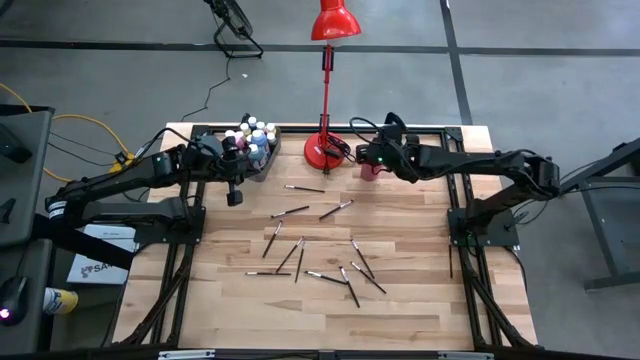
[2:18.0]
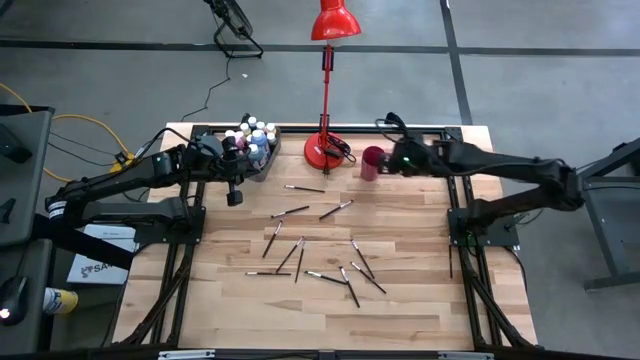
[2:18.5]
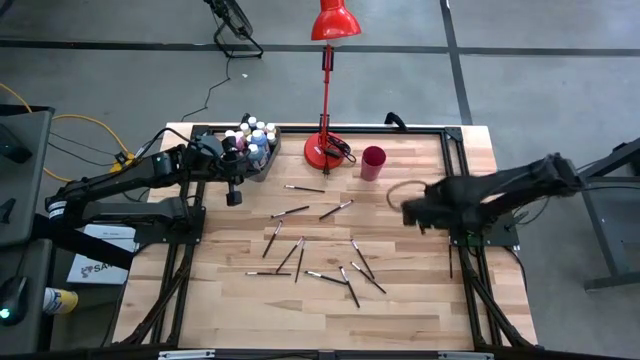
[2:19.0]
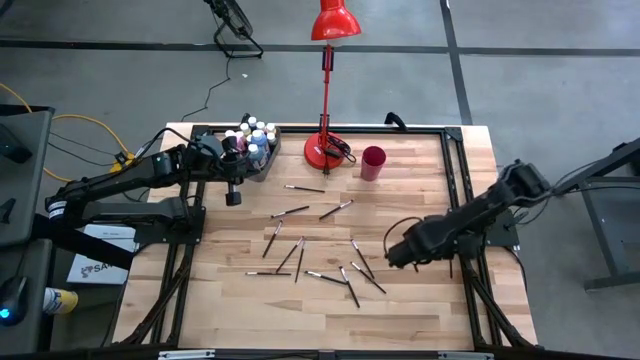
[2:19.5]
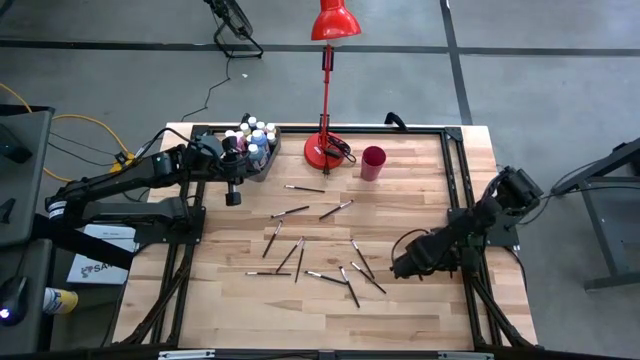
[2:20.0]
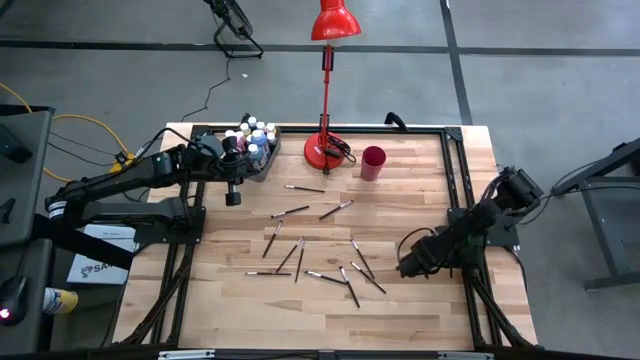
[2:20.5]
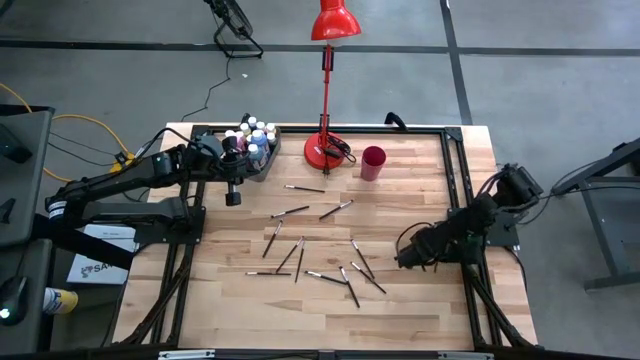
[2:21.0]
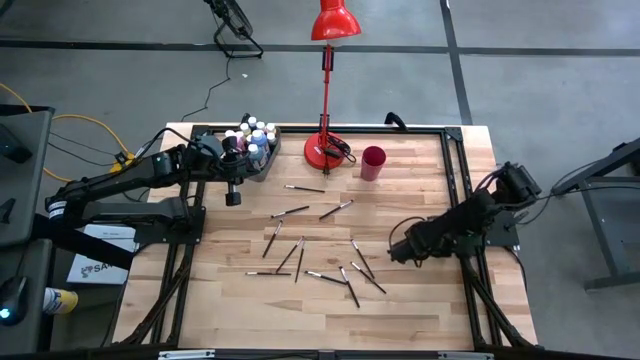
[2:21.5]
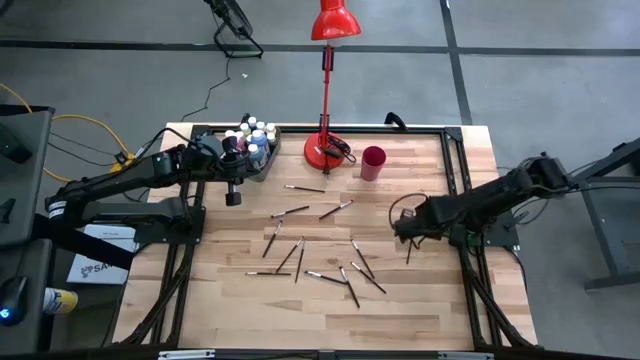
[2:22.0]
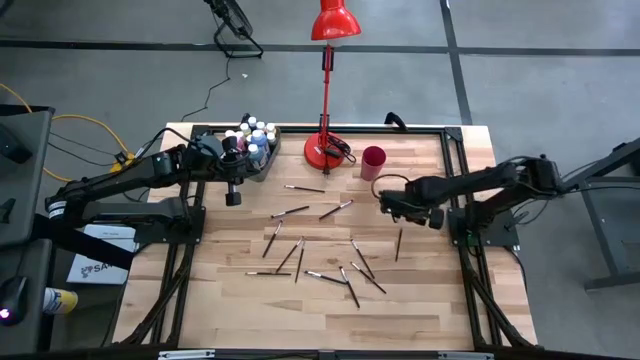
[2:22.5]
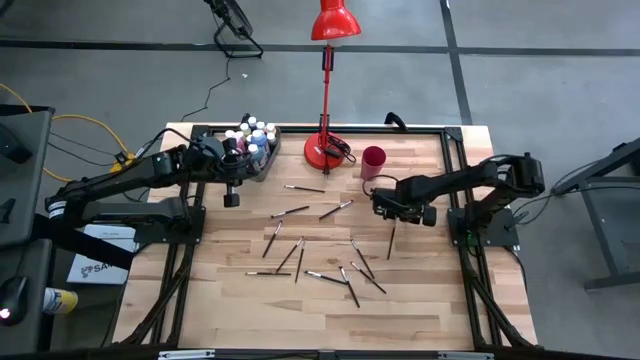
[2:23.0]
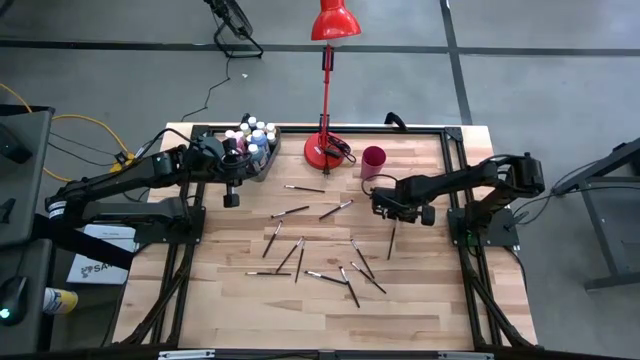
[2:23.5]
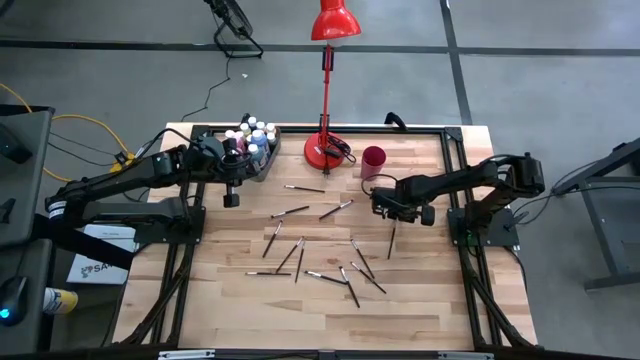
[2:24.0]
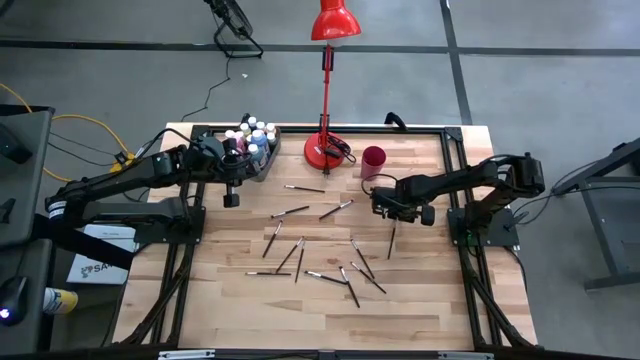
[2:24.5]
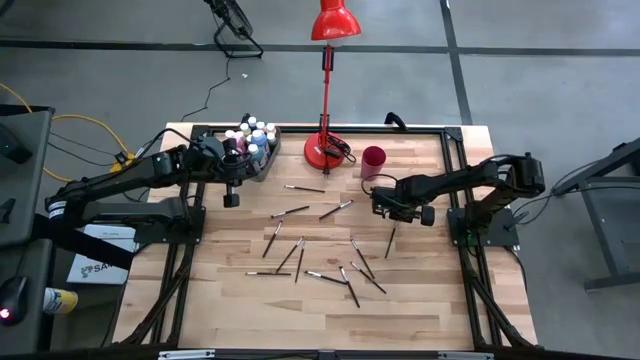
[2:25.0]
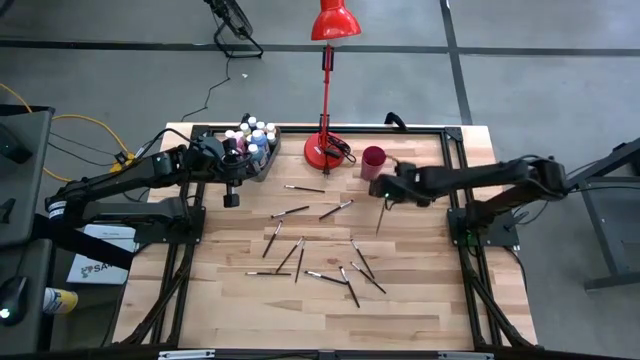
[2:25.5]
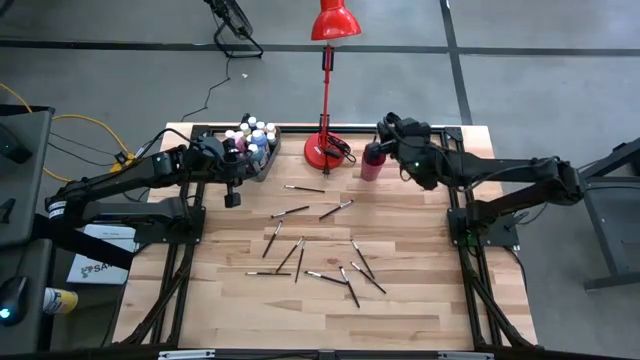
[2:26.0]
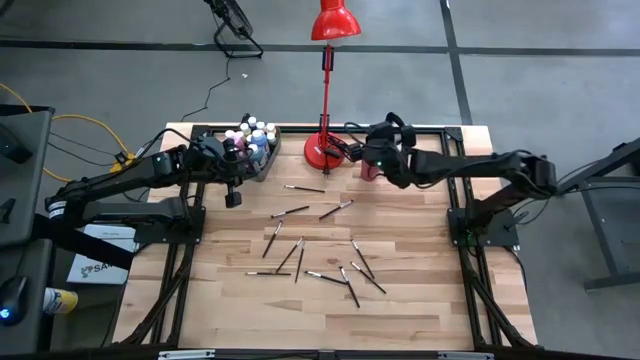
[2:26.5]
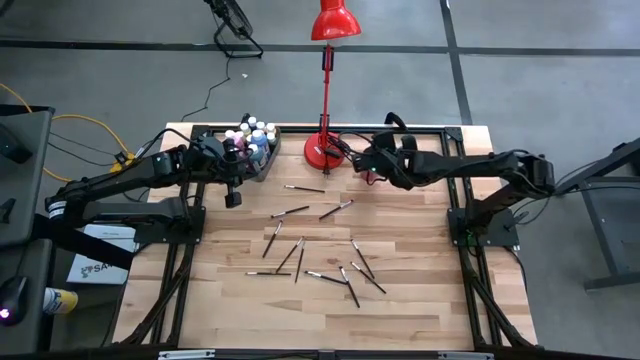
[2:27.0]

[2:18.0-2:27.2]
Task: Pick & Place Paint Supplies
Put the paint brush into the cup

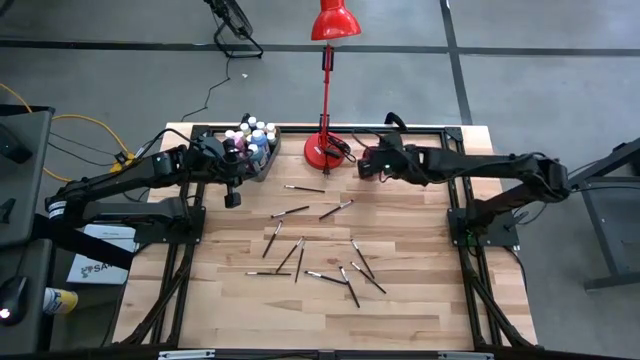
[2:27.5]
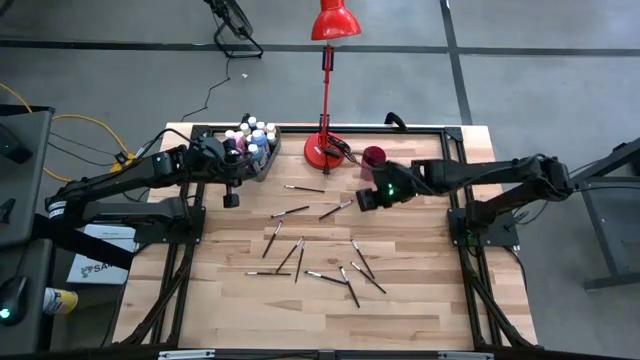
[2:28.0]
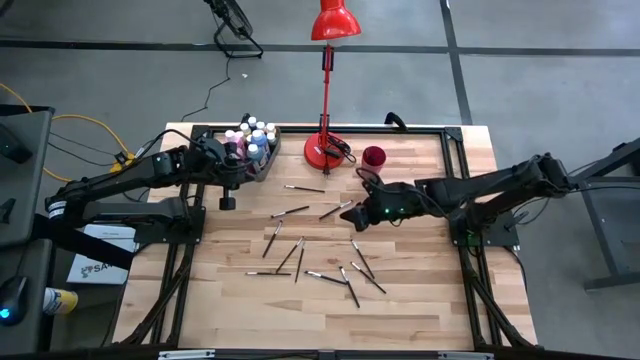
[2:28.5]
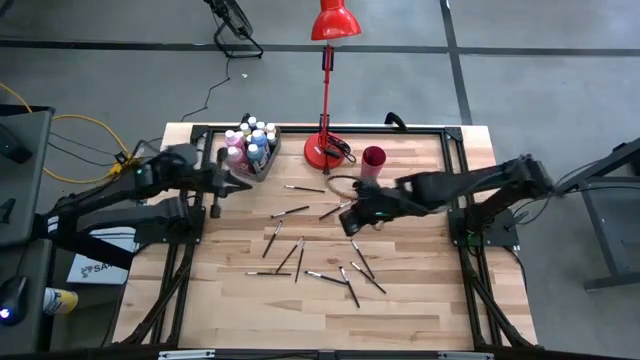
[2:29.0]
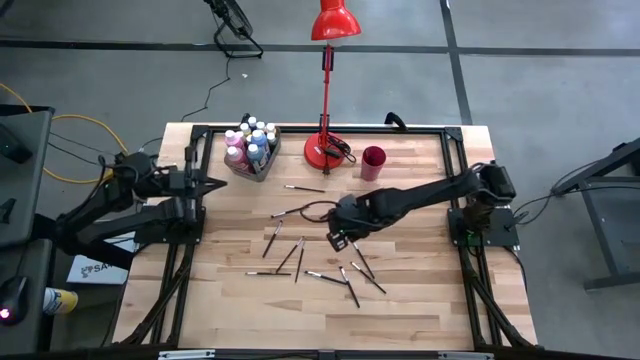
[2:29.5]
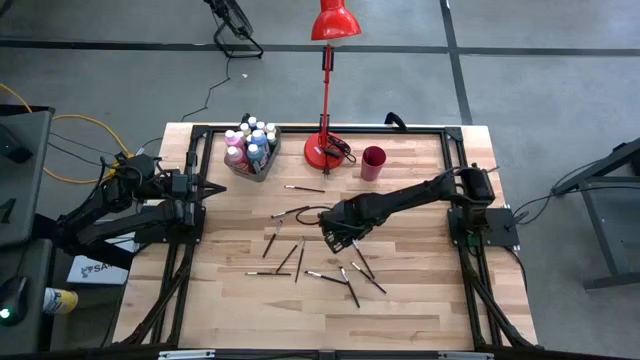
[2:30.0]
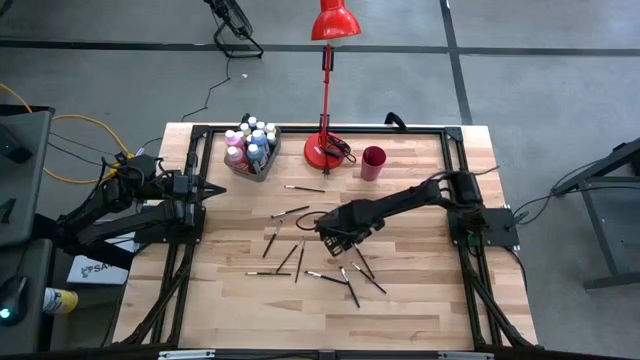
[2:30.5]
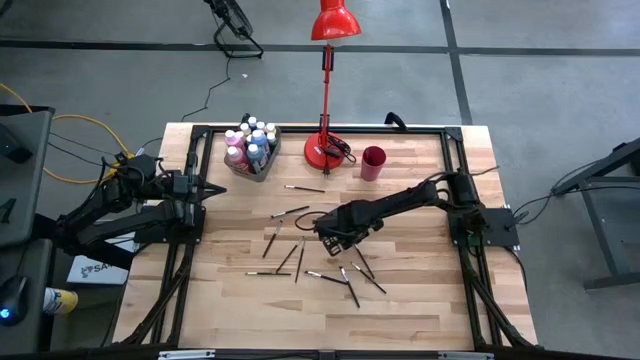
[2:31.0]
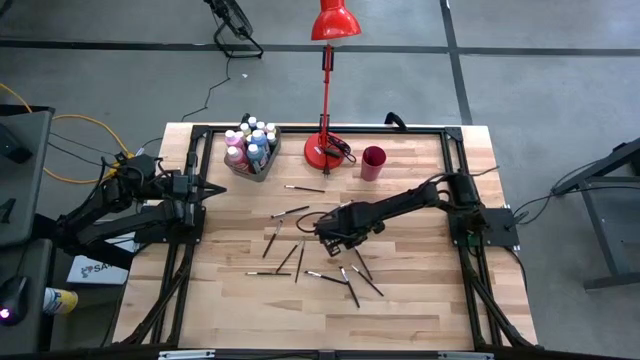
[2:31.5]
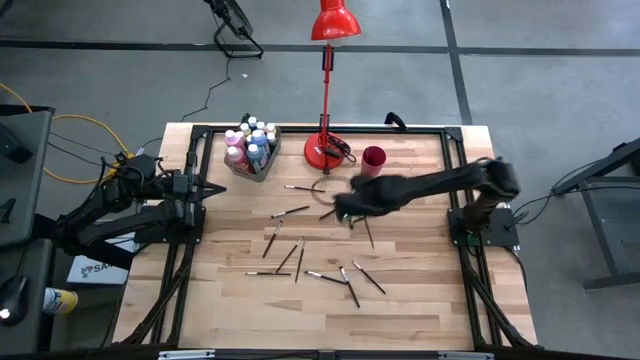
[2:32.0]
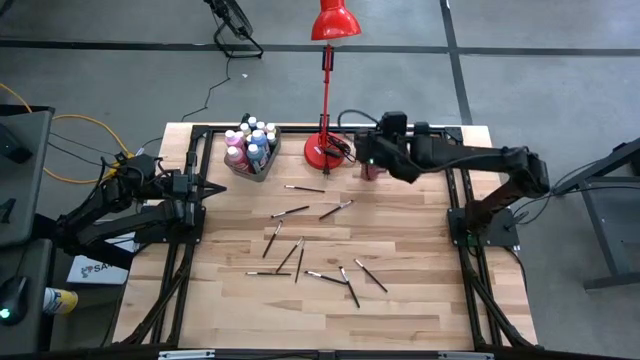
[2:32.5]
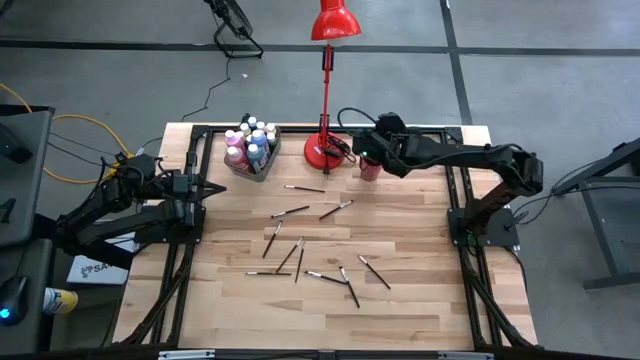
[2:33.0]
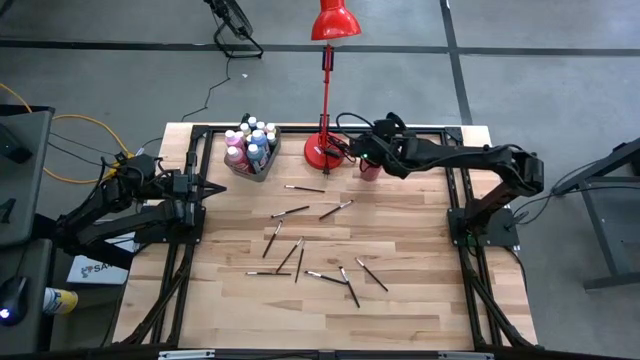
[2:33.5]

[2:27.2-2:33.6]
Put the paint brush into the cup

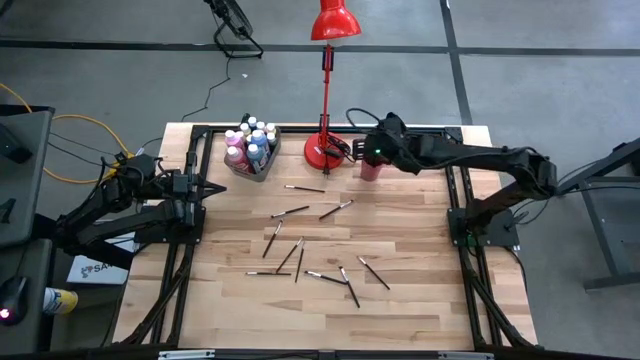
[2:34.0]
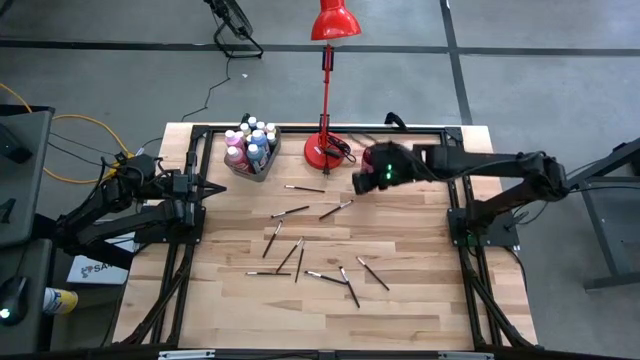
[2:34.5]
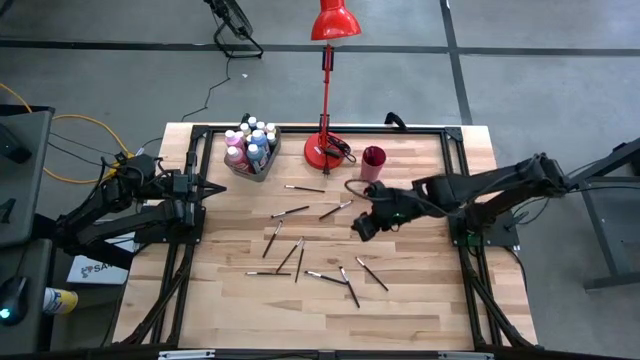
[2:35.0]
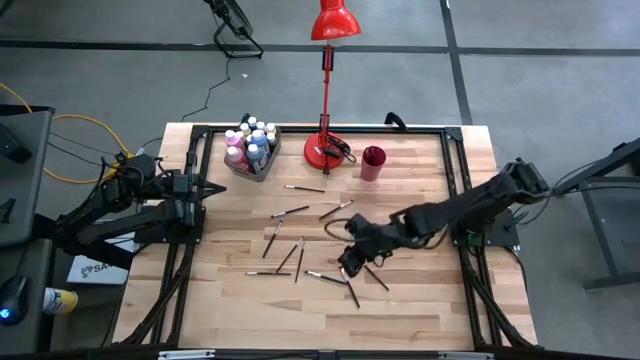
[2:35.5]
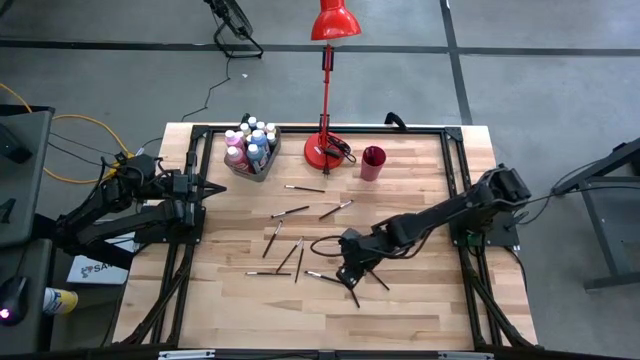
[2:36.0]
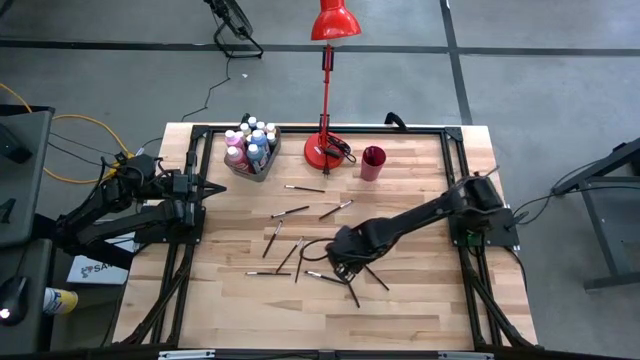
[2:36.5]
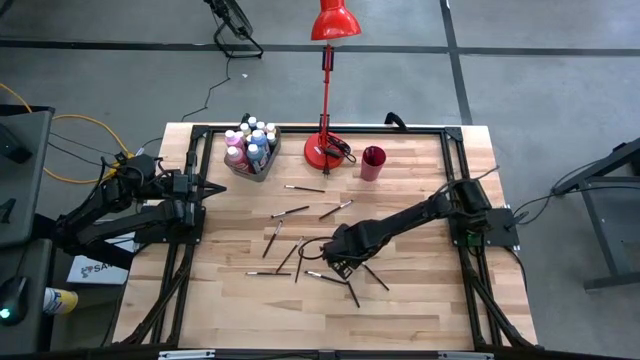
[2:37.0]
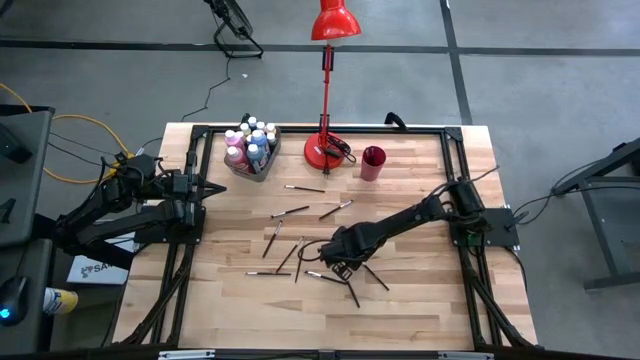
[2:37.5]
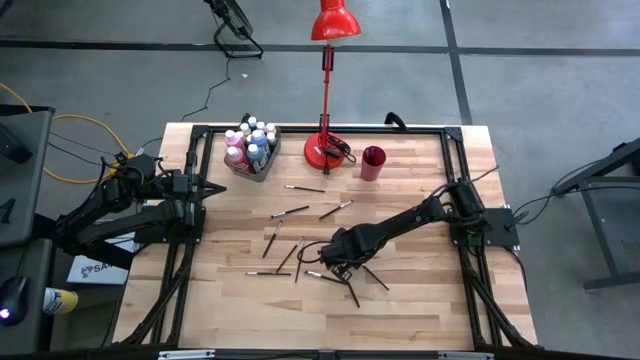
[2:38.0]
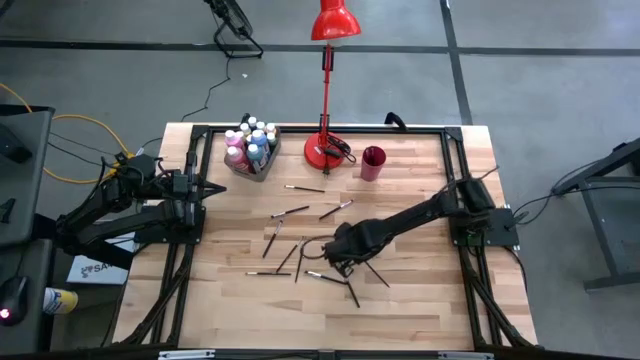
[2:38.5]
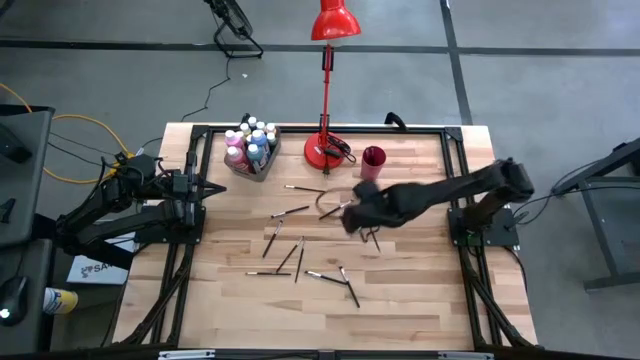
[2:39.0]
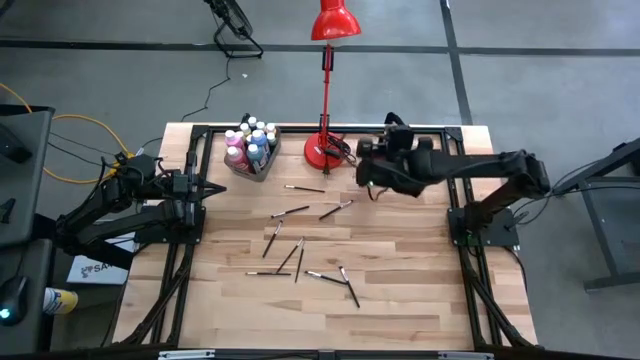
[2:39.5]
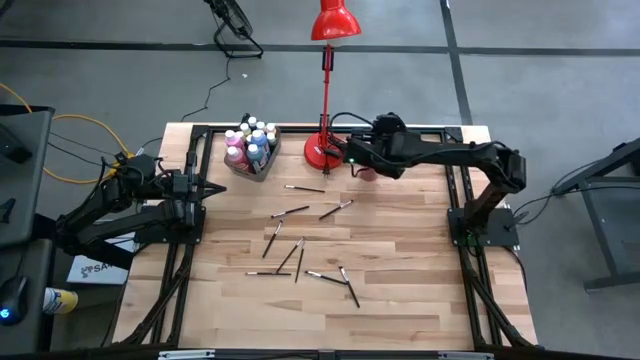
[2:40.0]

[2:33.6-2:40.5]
Put the paint brush into the cup
